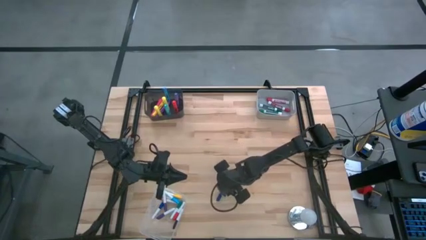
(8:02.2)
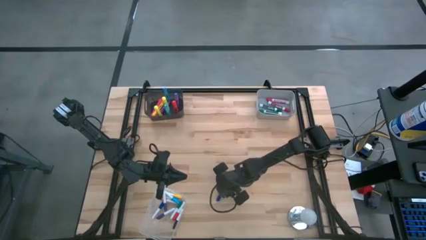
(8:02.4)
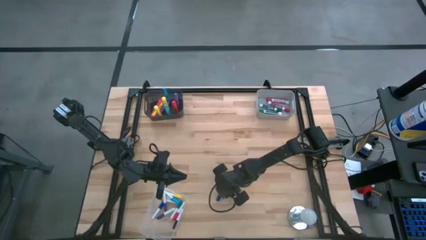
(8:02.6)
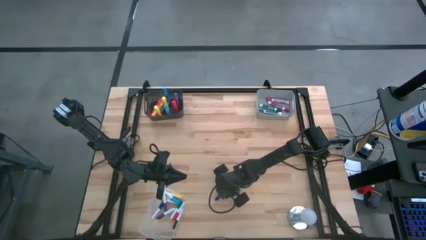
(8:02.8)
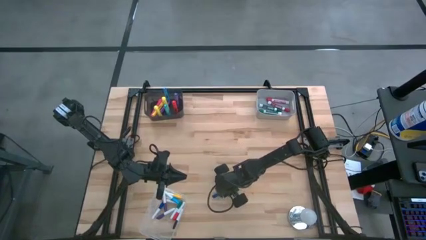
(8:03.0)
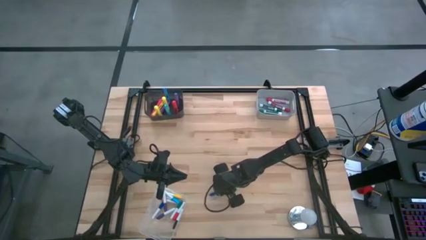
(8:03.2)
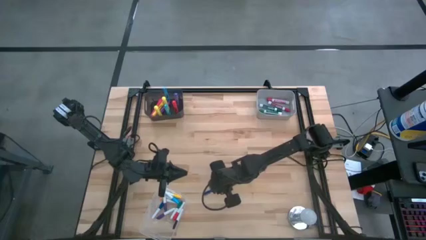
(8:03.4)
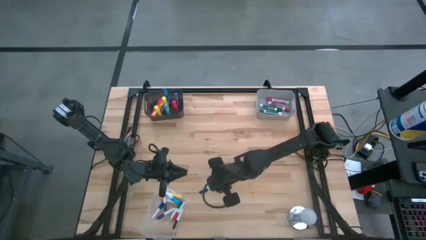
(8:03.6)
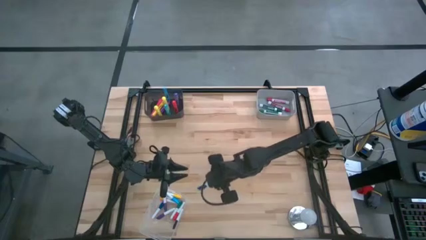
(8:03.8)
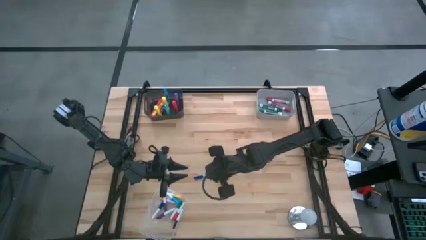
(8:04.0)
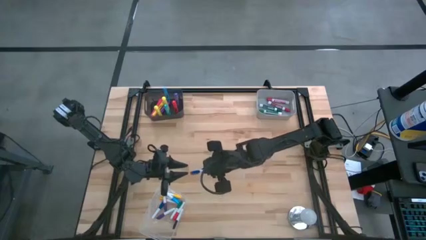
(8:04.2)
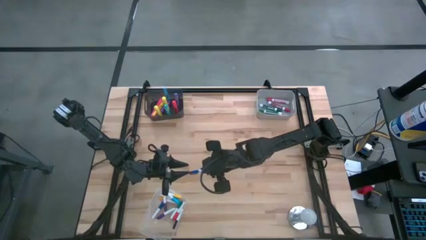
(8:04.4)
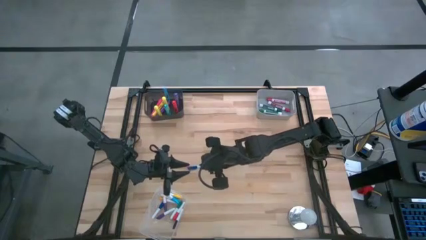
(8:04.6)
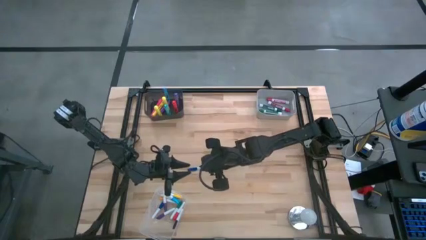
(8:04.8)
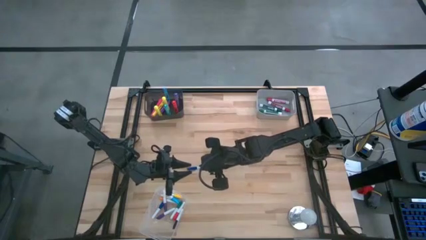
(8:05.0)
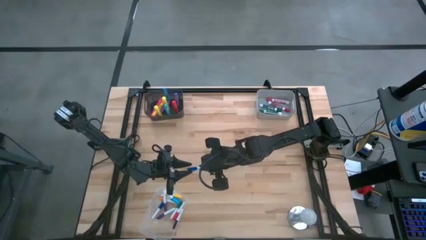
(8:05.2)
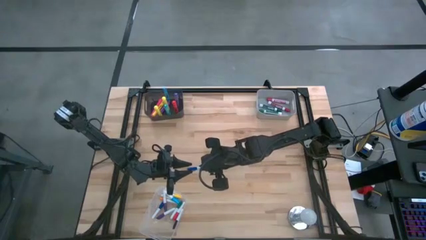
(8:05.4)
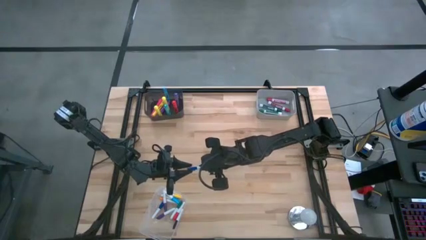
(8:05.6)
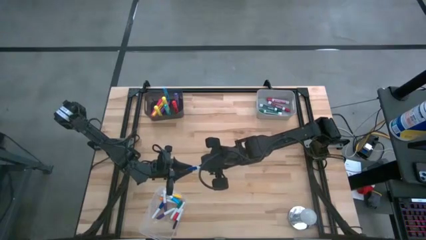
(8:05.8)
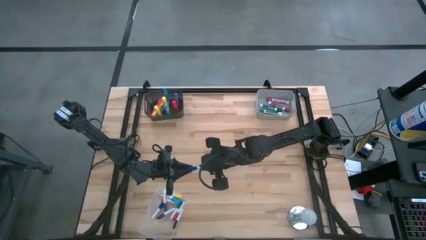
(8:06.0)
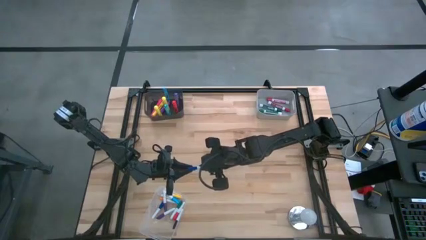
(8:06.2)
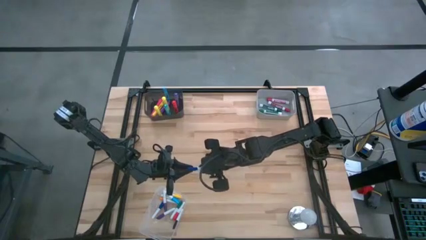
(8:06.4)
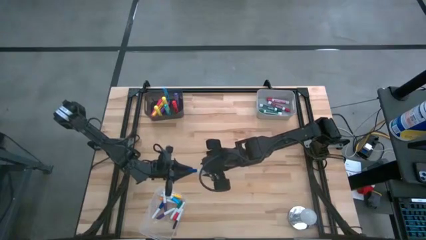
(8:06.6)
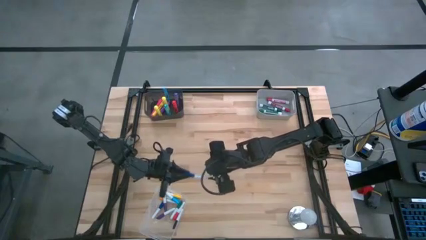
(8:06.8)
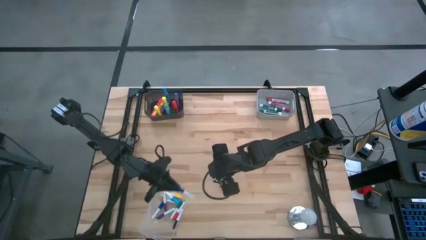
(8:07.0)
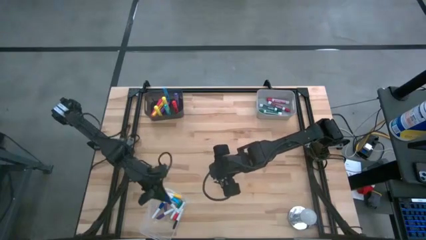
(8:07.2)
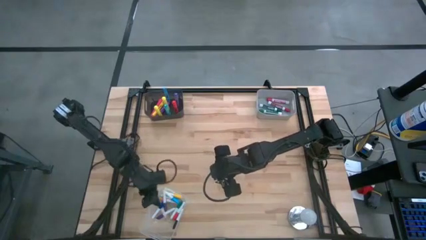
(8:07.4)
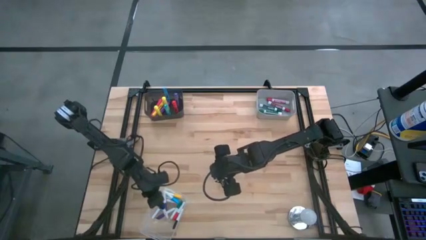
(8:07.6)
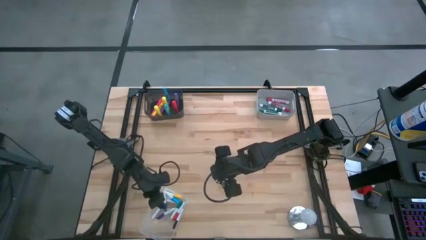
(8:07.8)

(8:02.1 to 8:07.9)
Task: Pick & Place Markers
Put the blue and white highlighter pen into the transparent bin

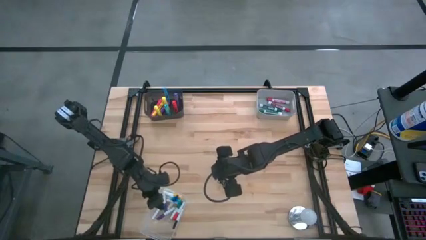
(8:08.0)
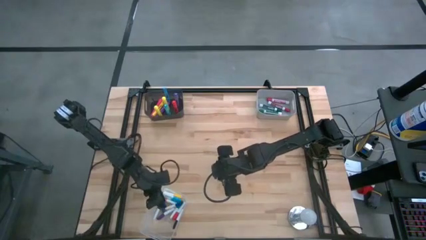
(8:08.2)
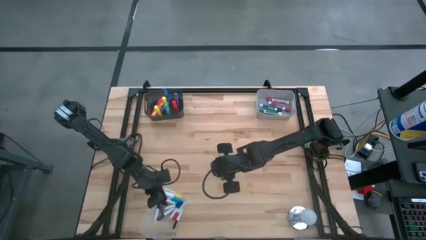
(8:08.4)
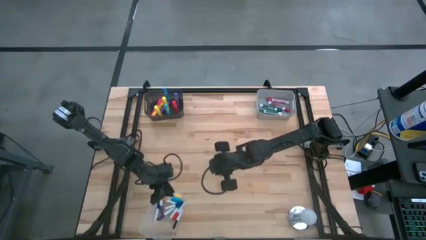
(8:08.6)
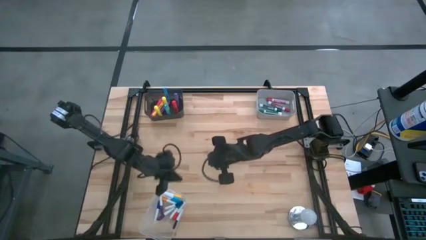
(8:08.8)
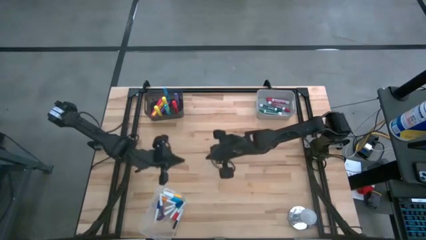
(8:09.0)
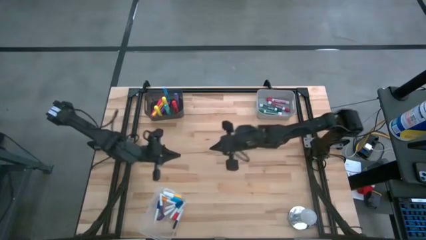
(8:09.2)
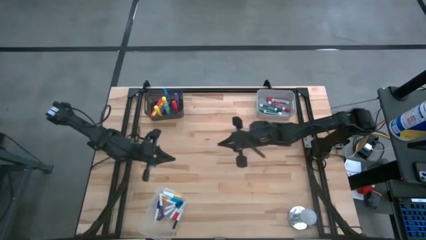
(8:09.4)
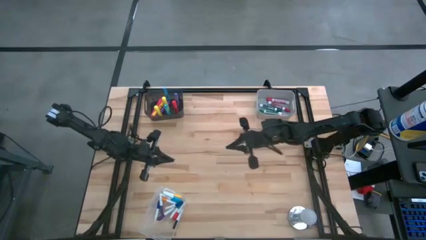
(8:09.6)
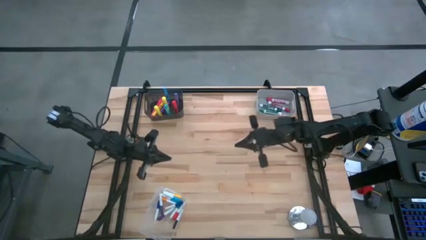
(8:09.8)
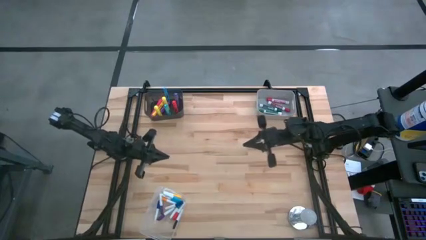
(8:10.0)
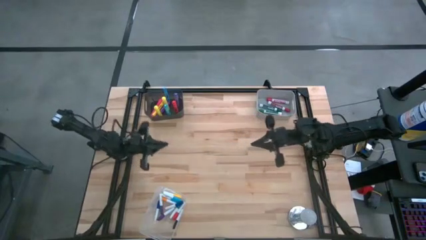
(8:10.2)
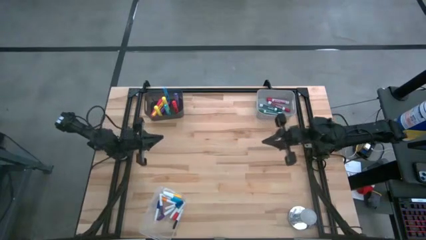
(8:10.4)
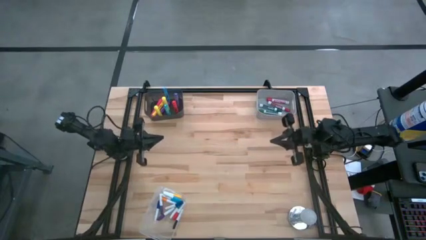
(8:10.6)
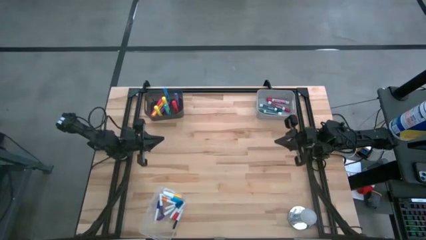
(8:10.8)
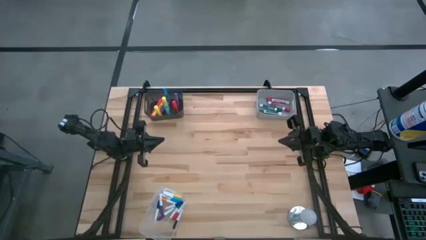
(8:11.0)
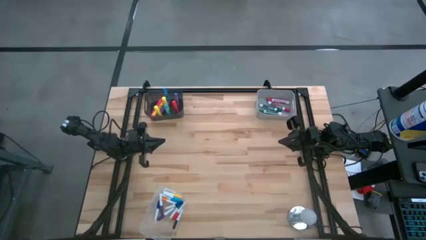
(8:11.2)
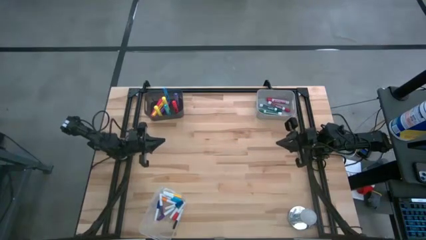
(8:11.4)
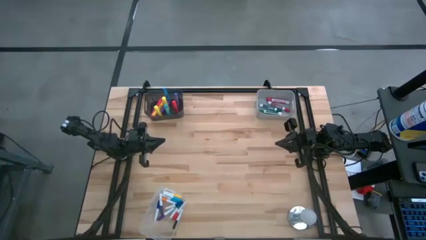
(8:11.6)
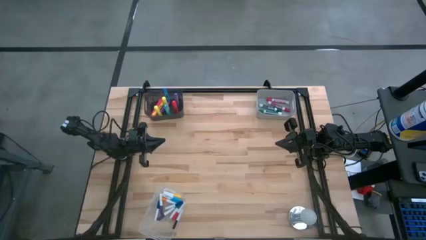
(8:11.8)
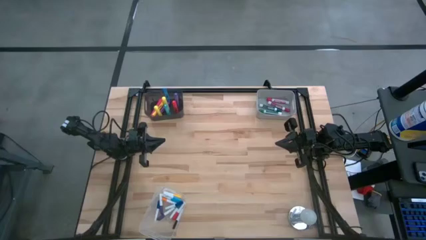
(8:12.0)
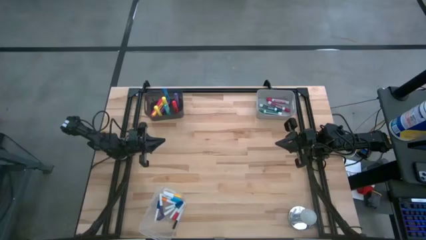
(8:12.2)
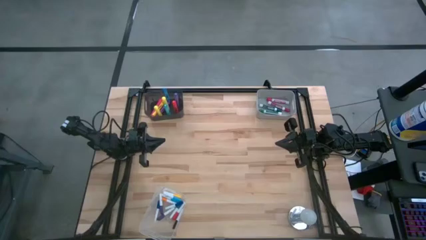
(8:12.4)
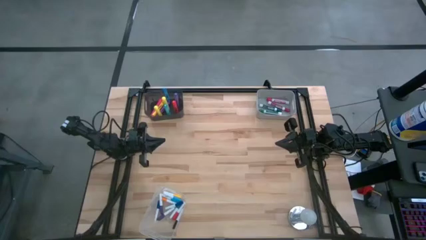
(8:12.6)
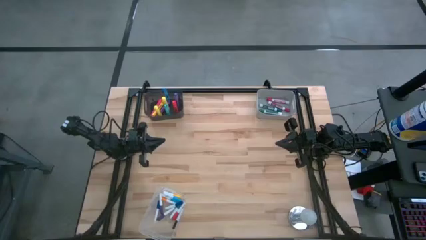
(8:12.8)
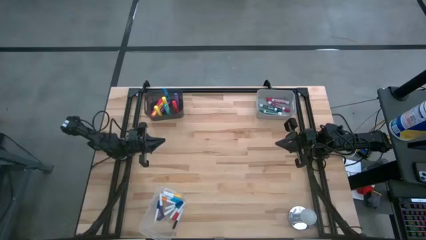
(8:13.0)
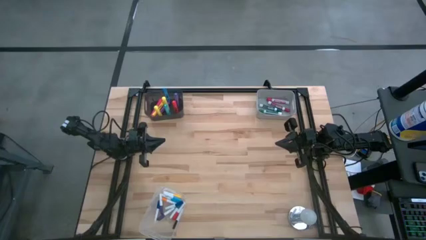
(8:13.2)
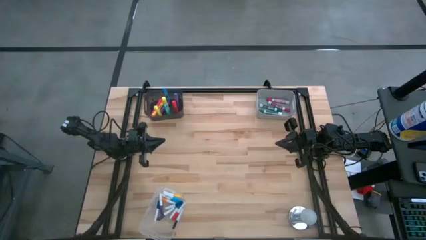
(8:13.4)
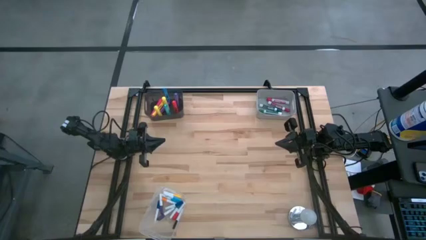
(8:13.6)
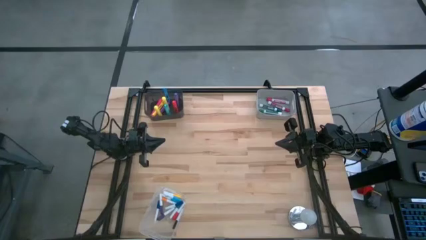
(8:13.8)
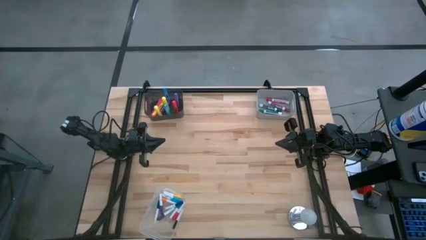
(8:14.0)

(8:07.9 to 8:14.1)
Return to Home Position

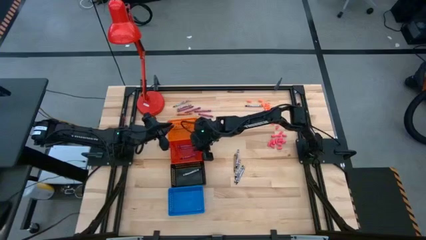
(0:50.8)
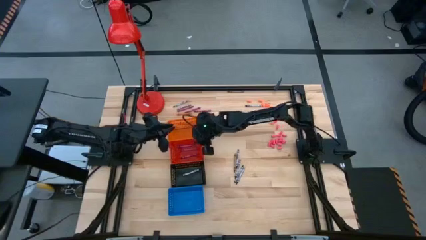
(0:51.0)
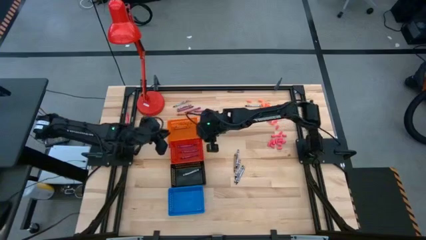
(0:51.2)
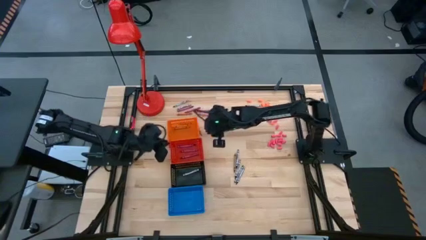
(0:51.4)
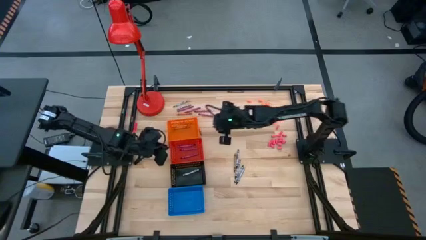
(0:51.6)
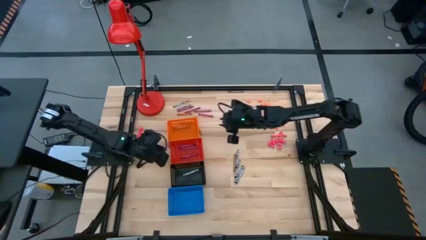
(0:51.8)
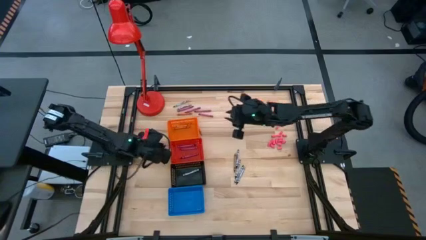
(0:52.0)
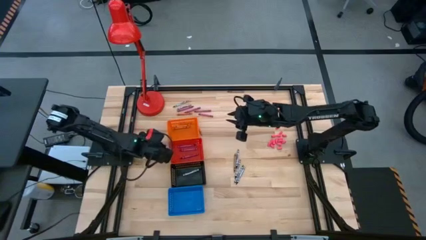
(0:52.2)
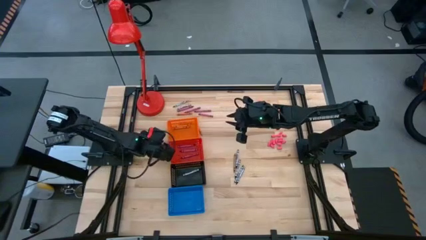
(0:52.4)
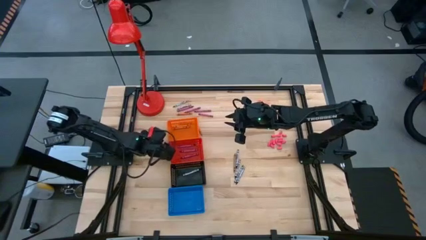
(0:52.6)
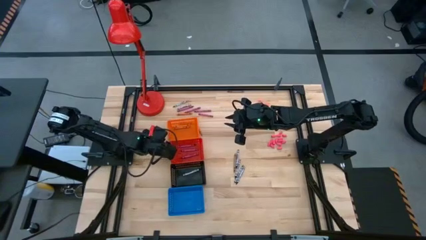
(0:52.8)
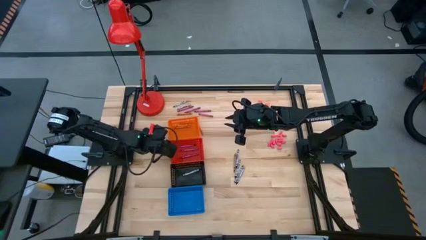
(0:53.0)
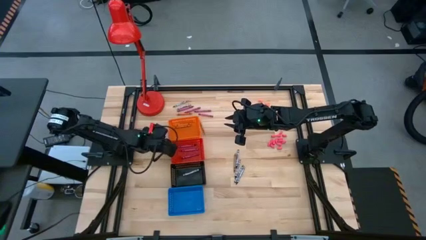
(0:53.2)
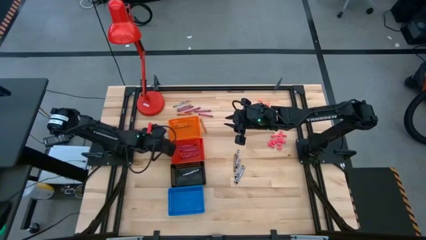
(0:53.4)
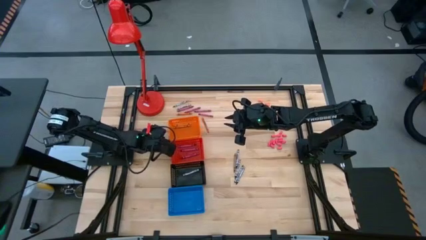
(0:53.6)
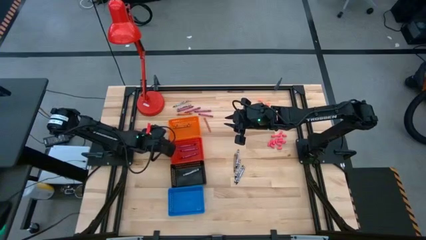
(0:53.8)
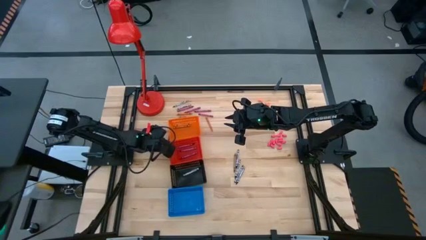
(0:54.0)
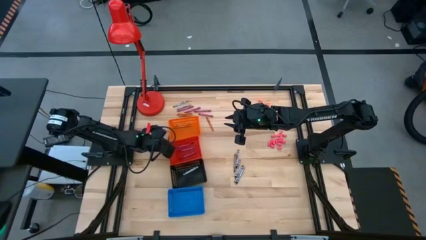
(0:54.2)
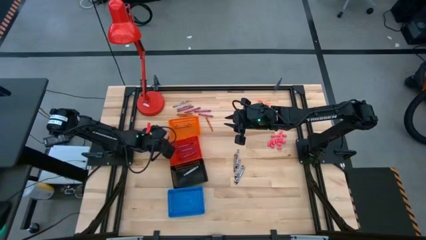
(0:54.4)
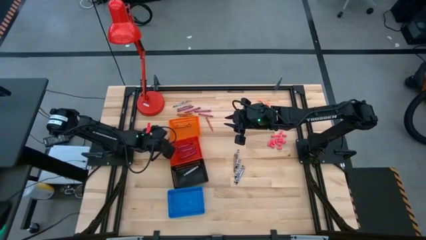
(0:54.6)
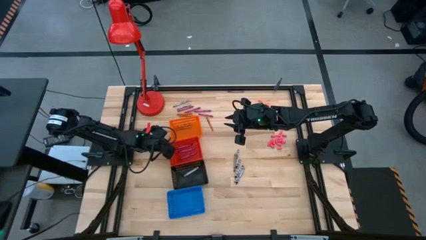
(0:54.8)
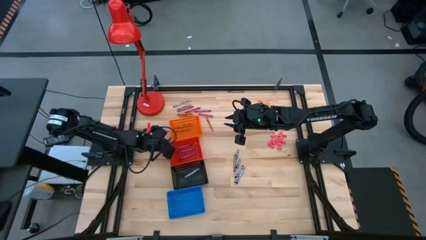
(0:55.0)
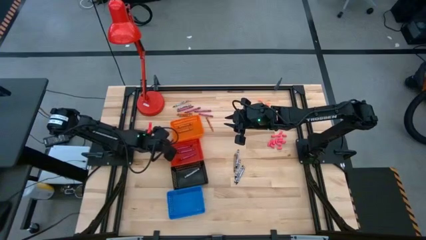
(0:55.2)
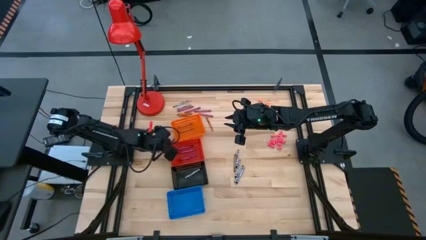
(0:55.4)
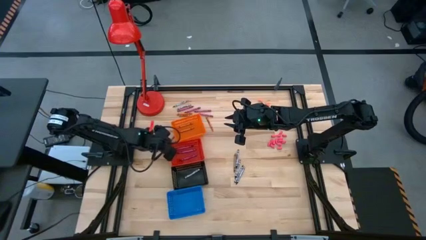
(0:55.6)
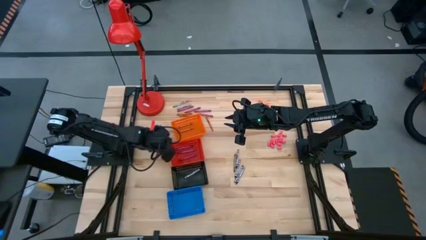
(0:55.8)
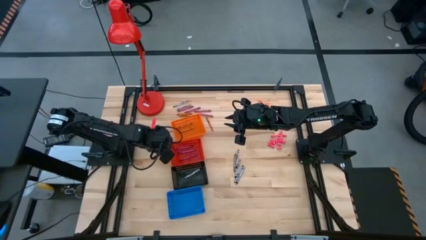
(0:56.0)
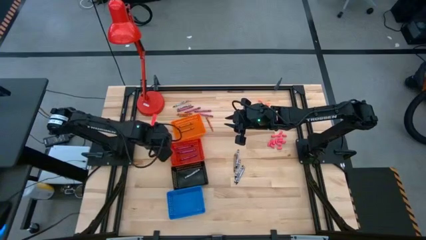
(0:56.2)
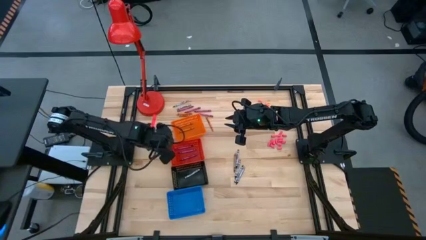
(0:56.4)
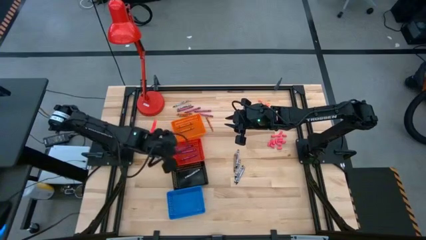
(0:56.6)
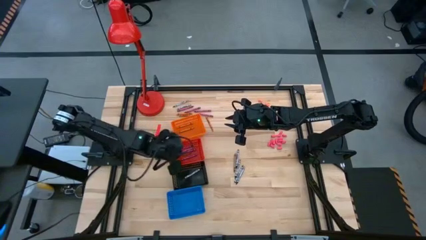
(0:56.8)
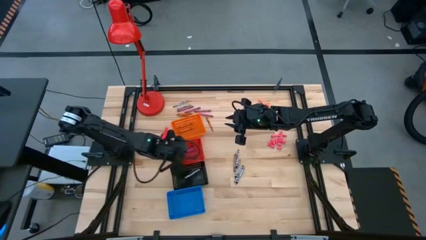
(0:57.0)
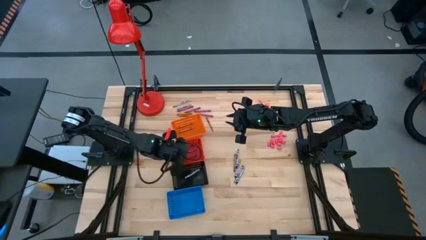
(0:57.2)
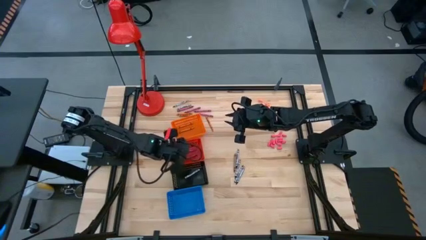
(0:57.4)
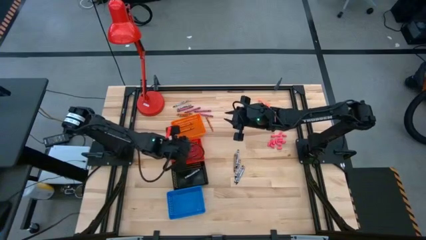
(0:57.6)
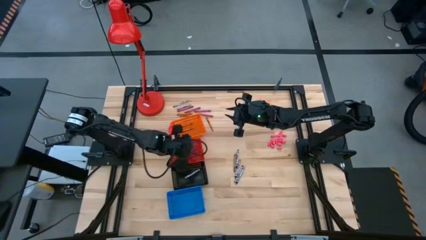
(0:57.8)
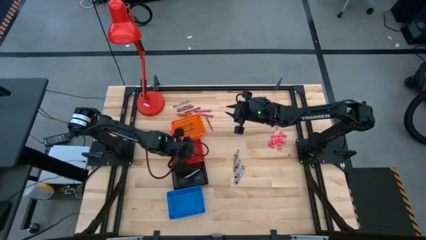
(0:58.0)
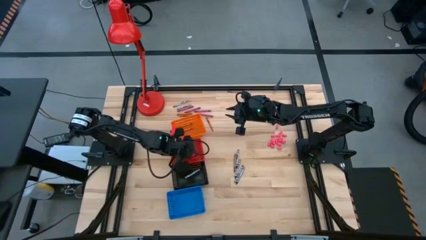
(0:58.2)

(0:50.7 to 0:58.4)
Task: Sort crayons
Put the red crayon into the red basket
